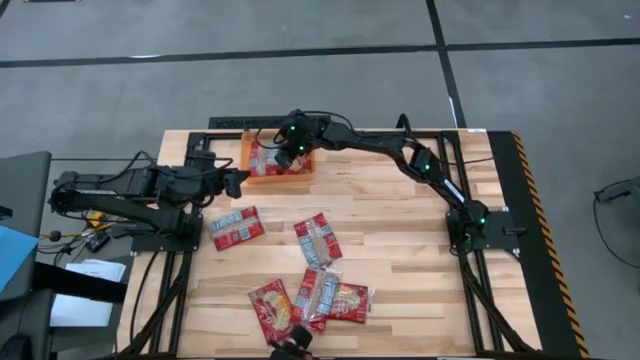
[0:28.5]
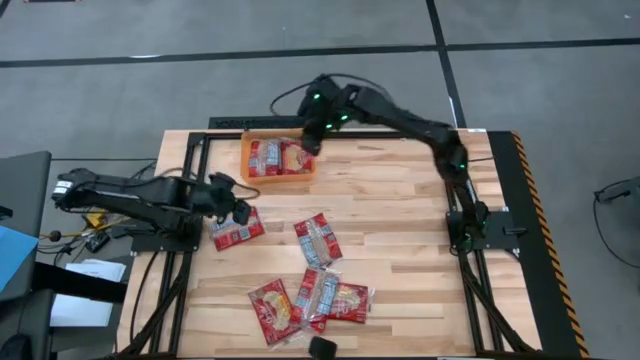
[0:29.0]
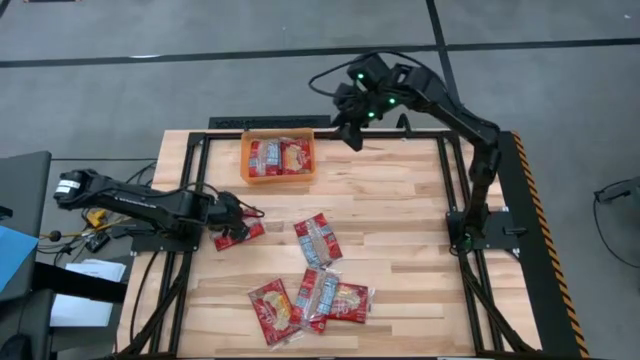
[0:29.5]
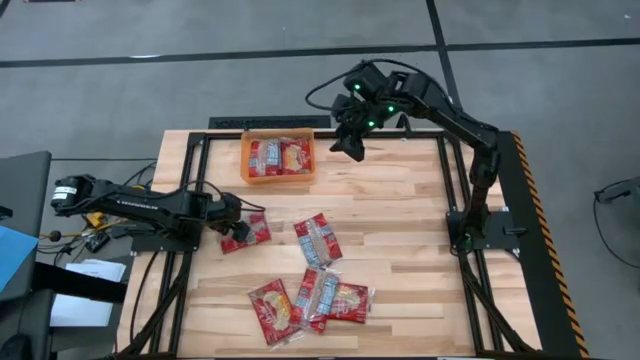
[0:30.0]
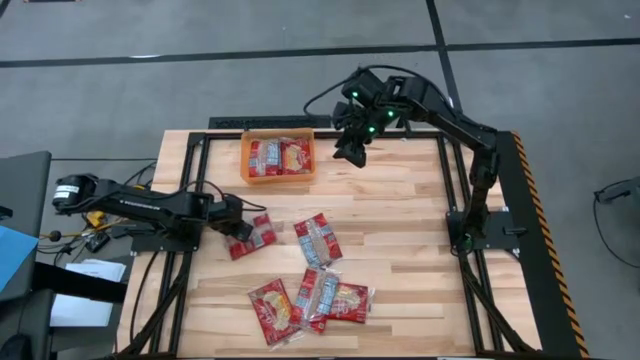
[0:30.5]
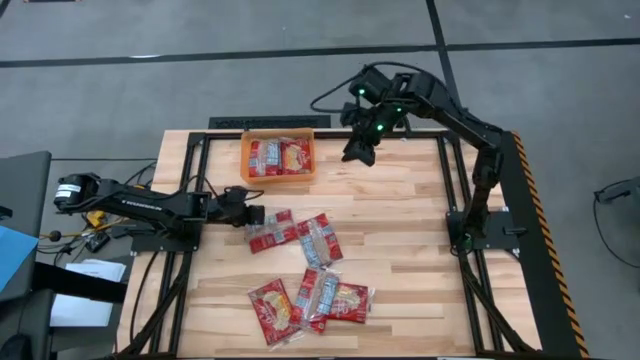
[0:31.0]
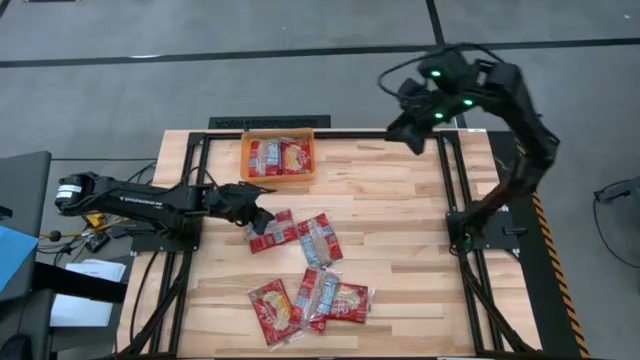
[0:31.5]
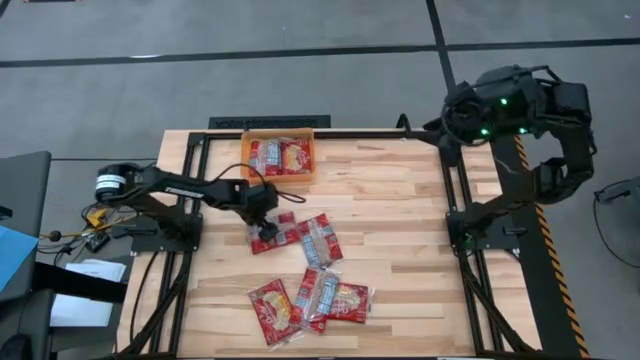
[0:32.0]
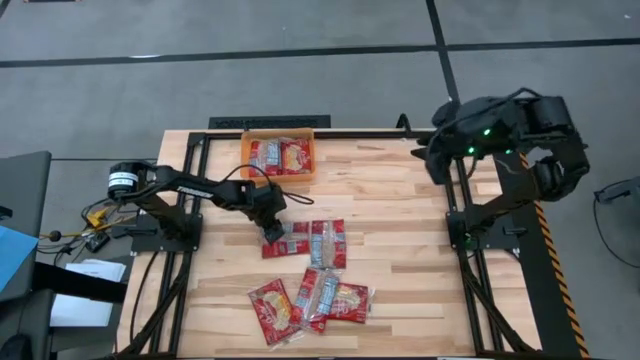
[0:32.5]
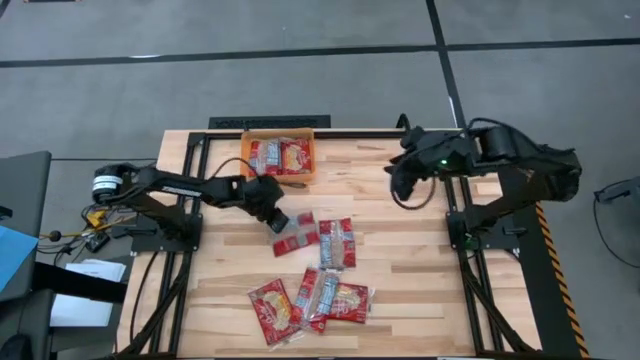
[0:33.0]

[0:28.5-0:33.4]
Task: Sort popcorn bags into baskets
Put the popcorn bag into the orange bin

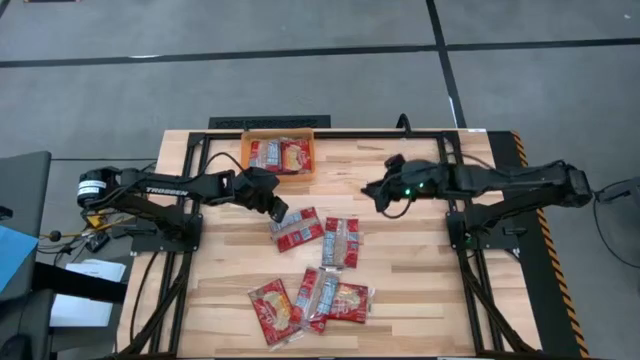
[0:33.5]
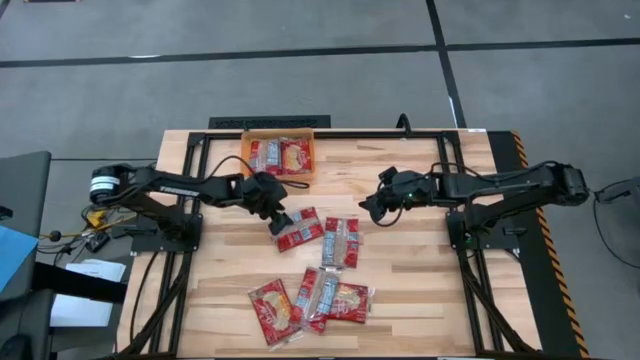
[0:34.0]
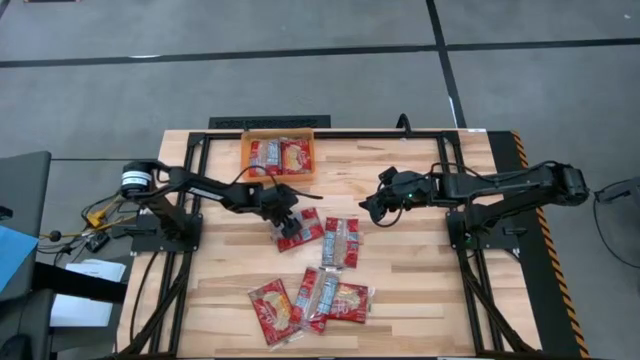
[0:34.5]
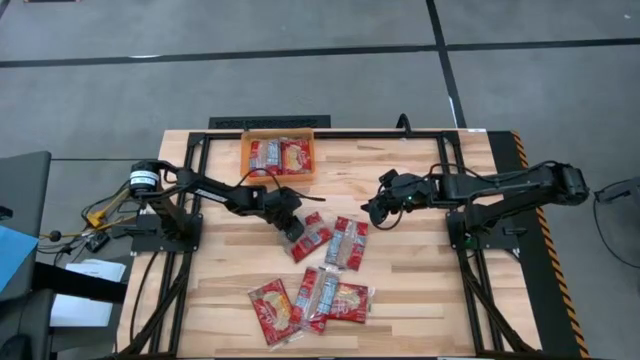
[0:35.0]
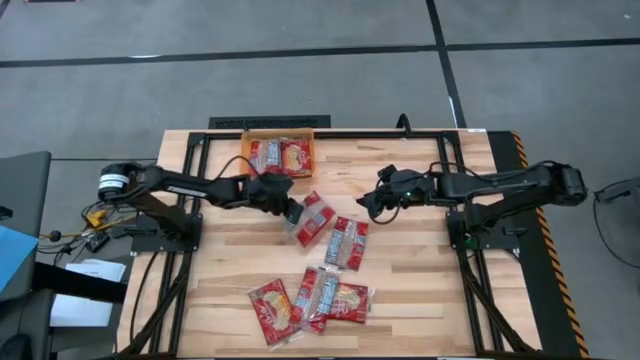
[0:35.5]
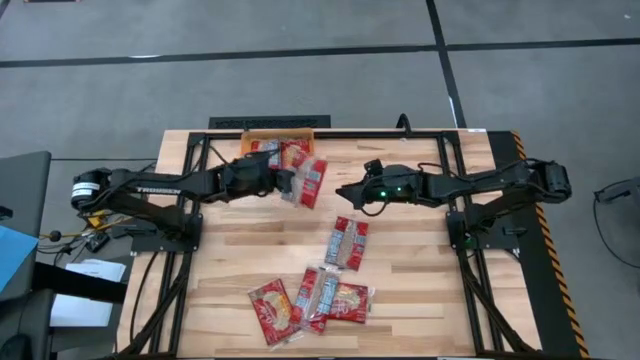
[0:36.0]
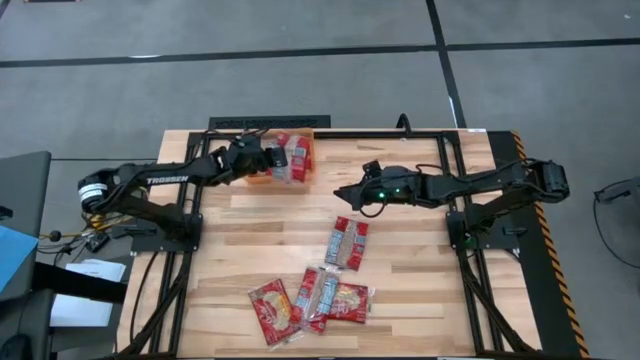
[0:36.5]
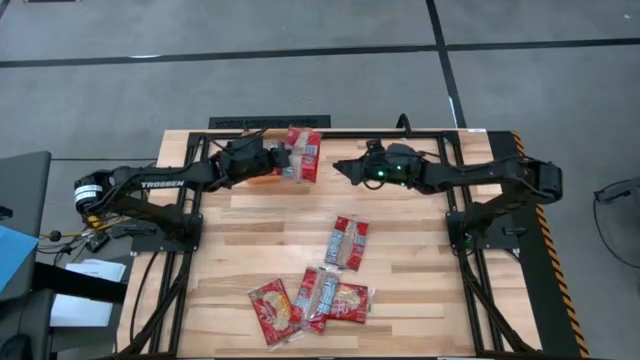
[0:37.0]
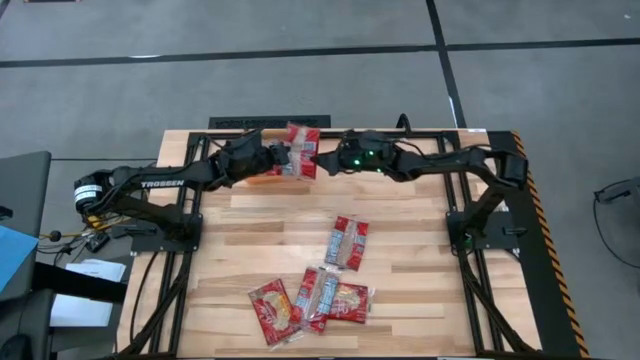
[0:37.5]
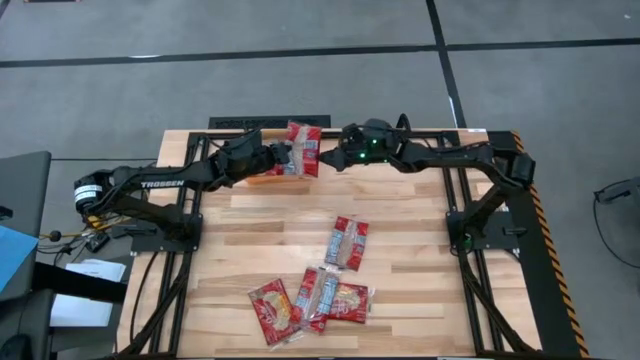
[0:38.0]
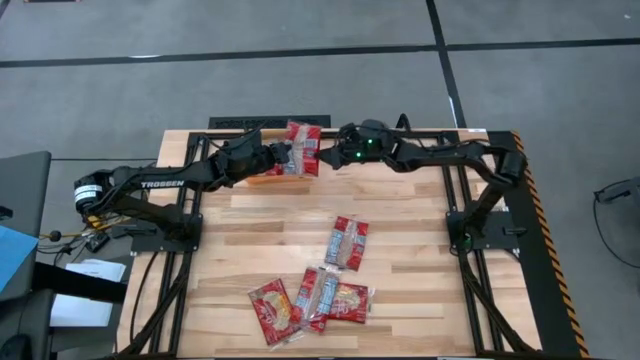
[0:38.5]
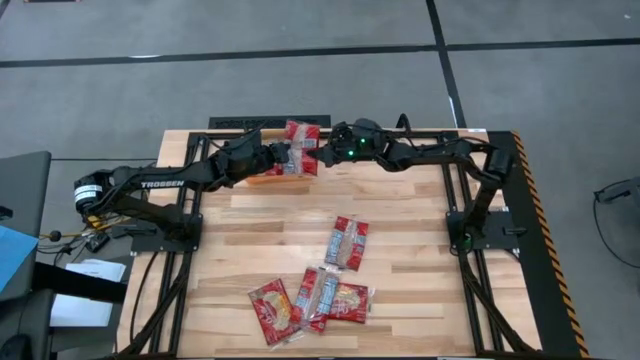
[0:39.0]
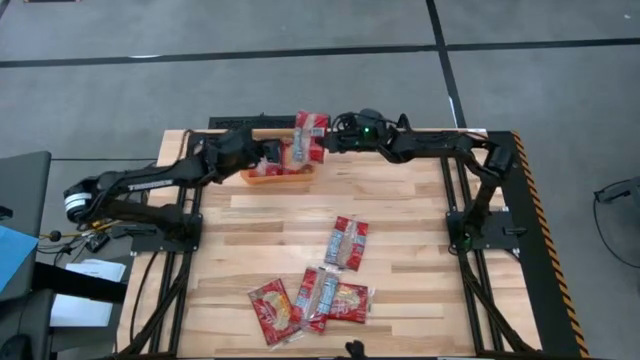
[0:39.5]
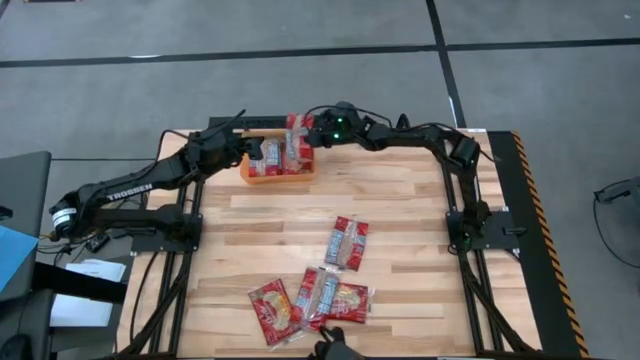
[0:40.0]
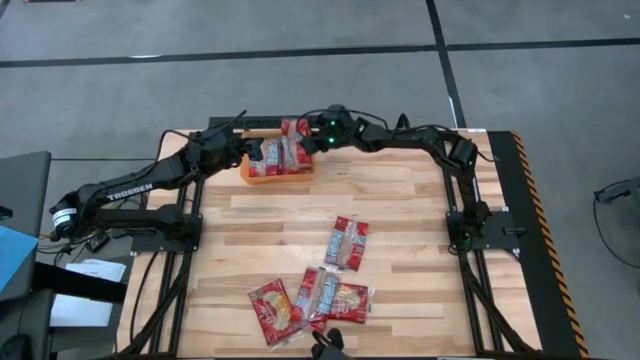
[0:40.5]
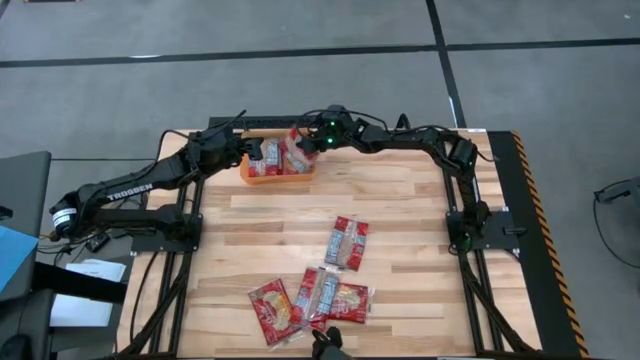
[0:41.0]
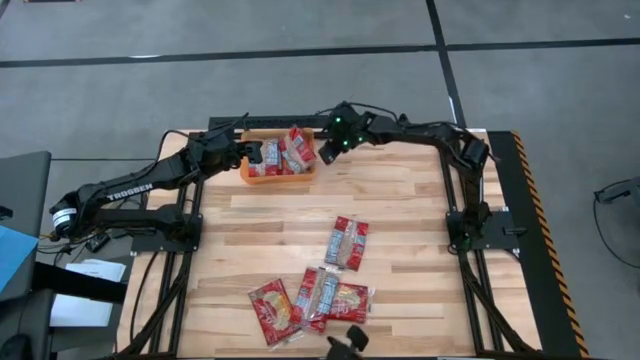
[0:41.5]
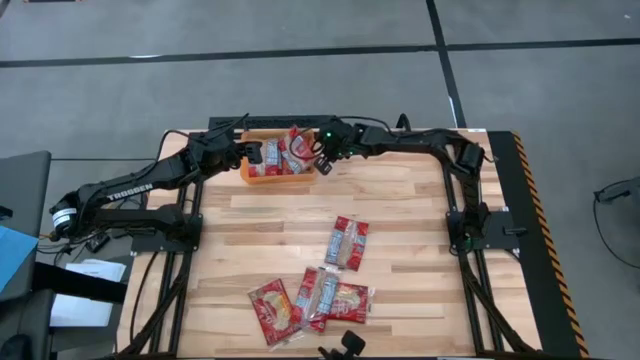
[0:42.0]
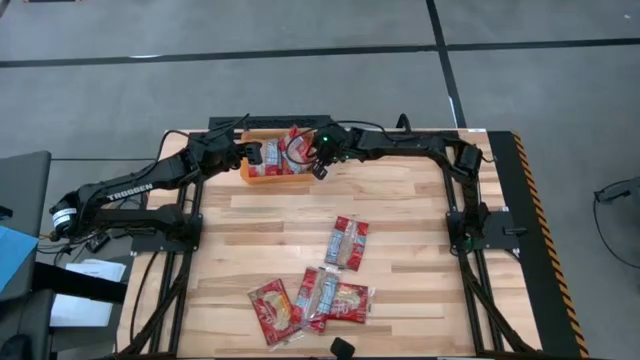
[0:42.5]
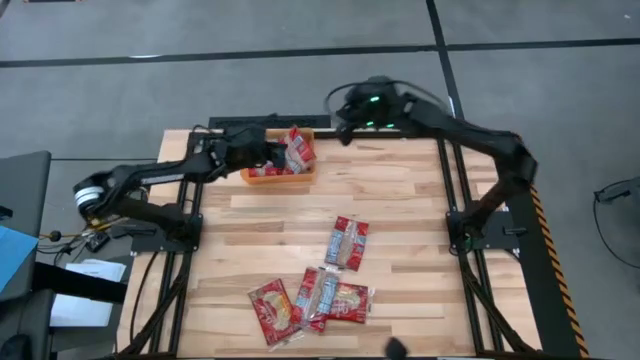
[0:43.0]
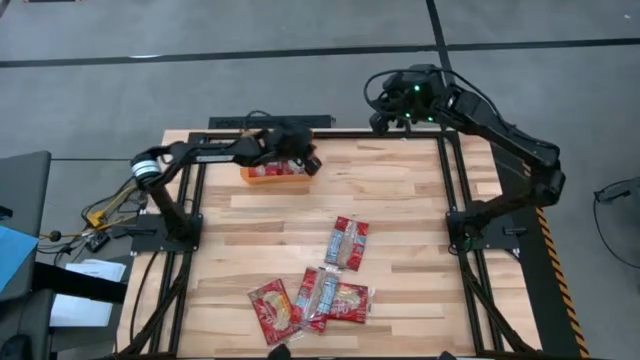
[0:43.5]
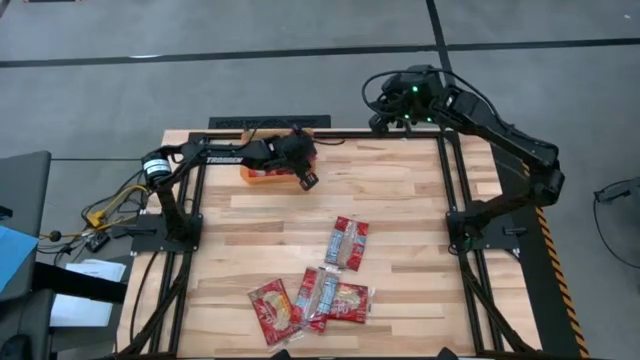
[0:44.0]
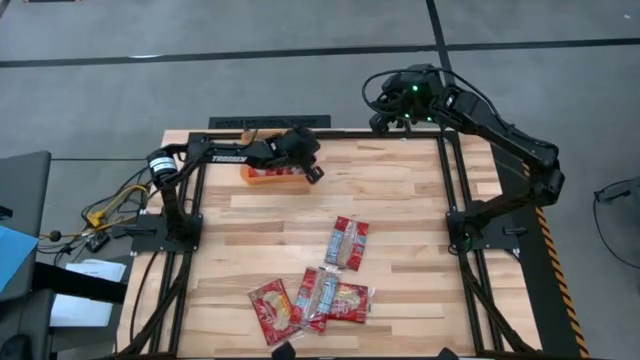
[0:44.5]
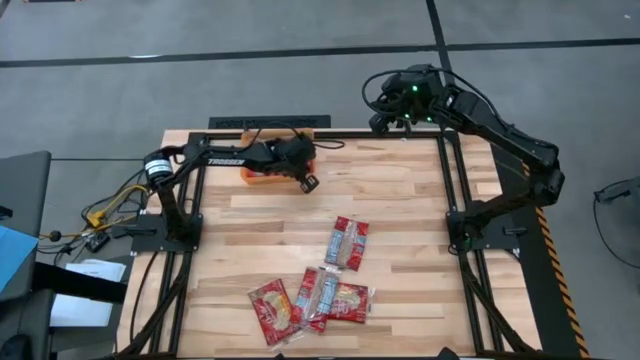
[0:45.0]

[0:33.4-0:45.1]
Put the popcorn bag into the orange bin

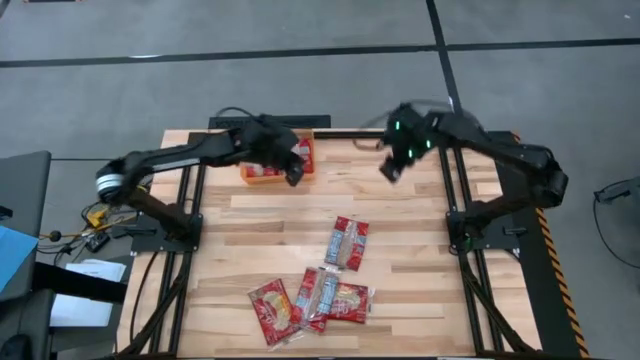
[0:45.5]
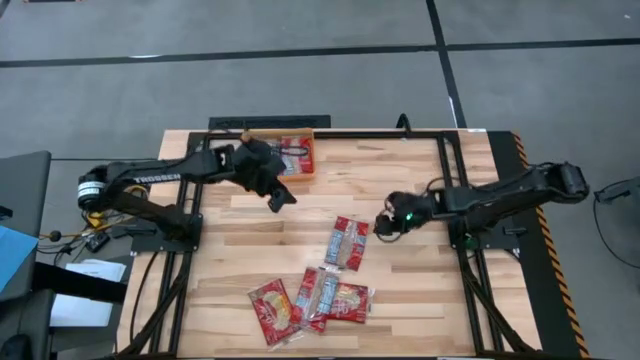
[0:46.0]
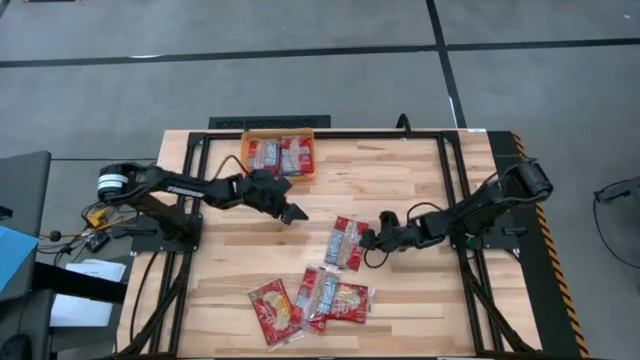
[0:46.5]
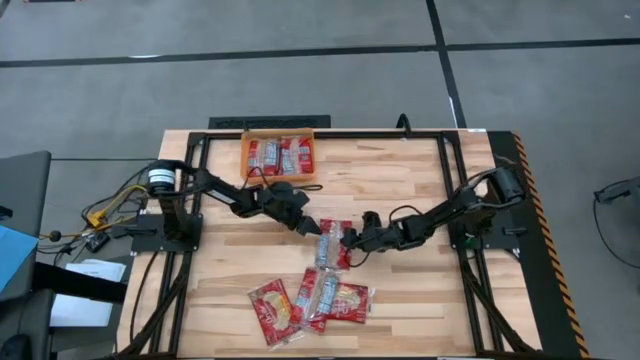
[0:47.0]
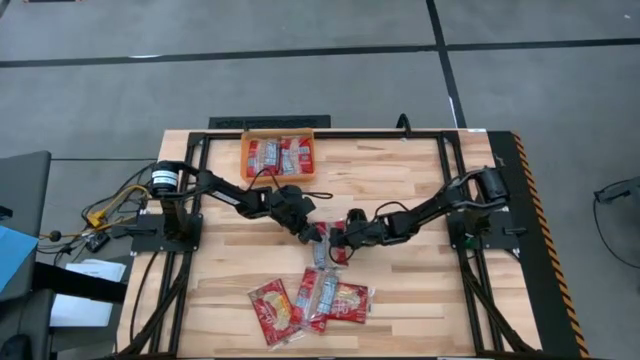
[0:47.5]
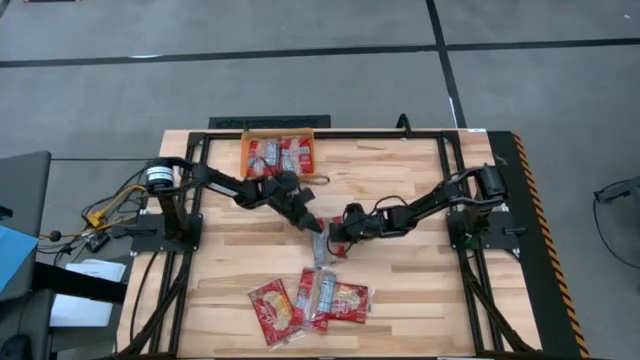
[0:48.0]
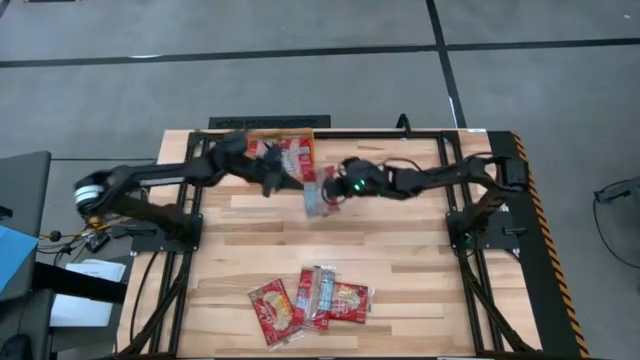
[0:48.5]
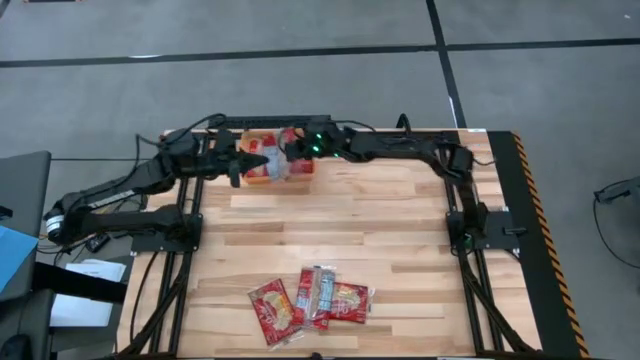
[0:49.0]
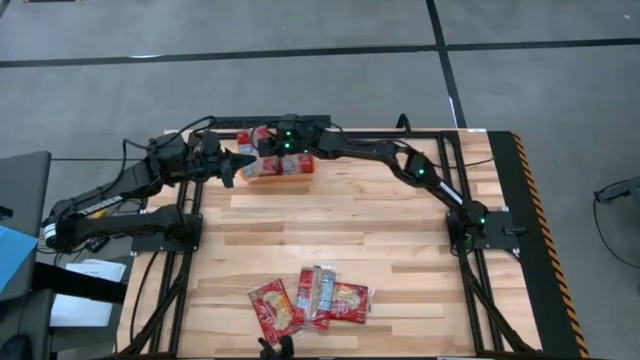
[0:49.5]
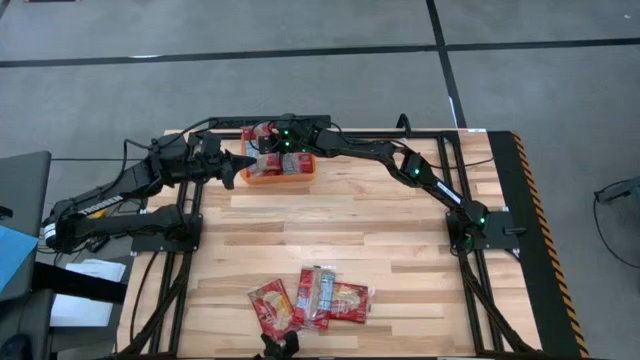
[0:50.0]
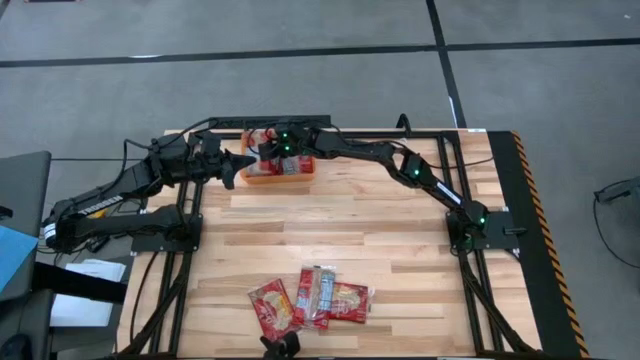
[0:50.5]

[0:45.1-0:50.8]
Put the popcorn bag into the orange bin
